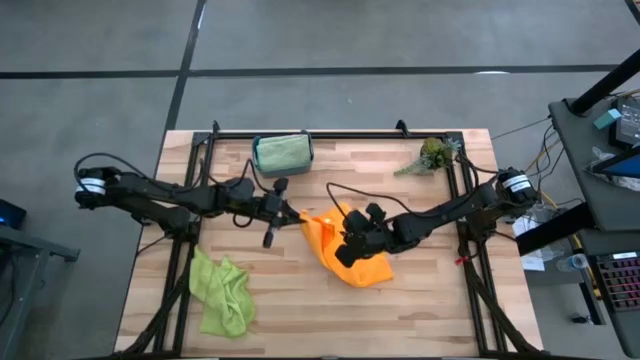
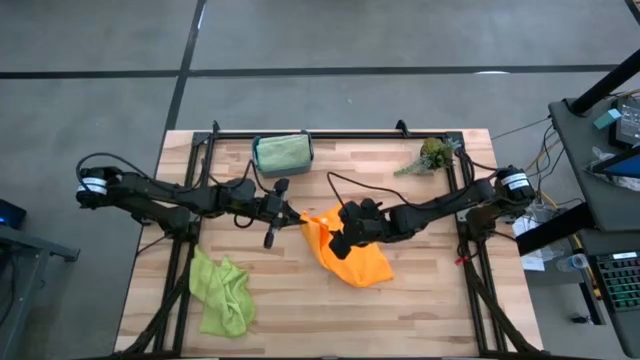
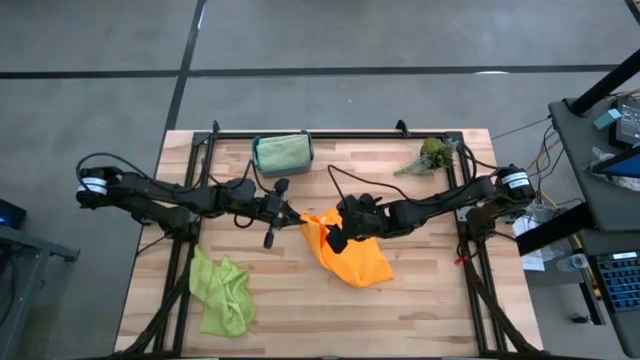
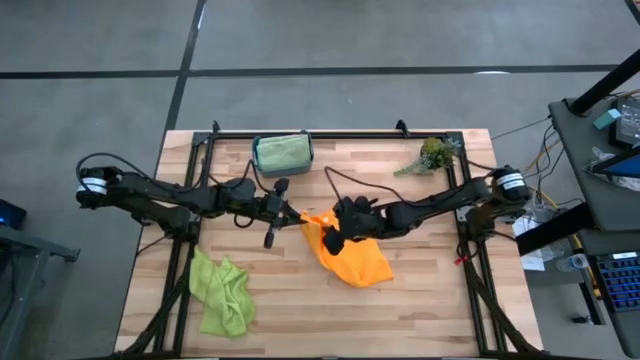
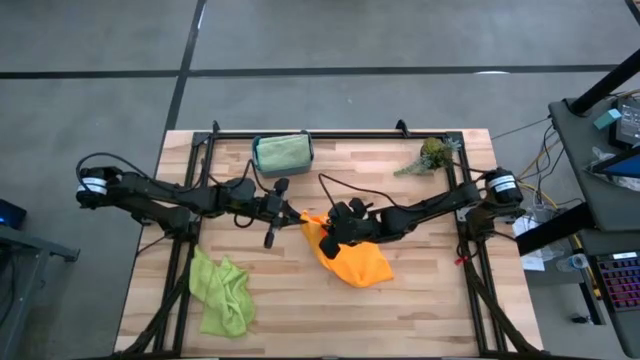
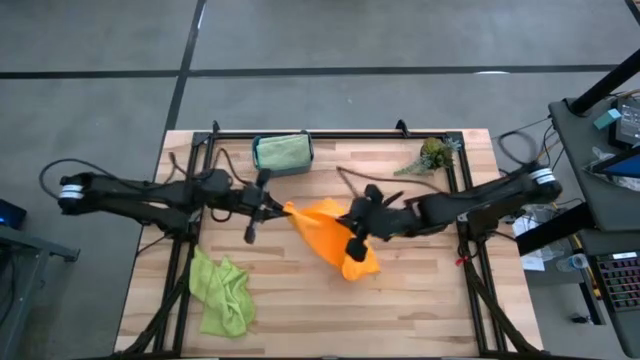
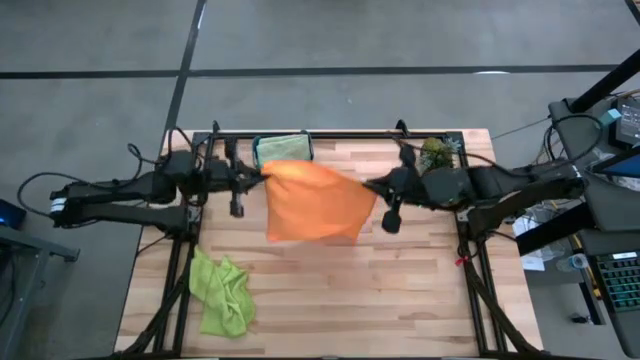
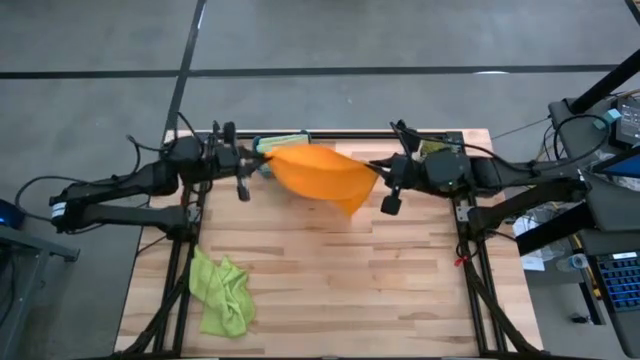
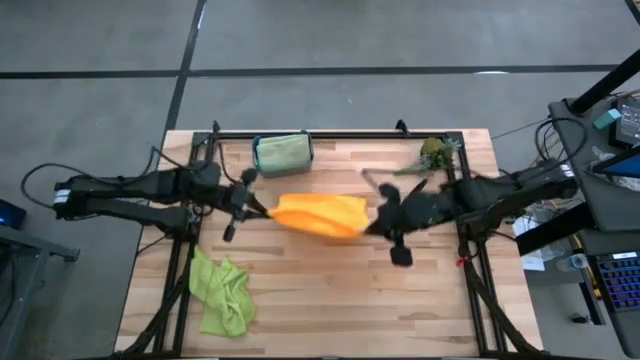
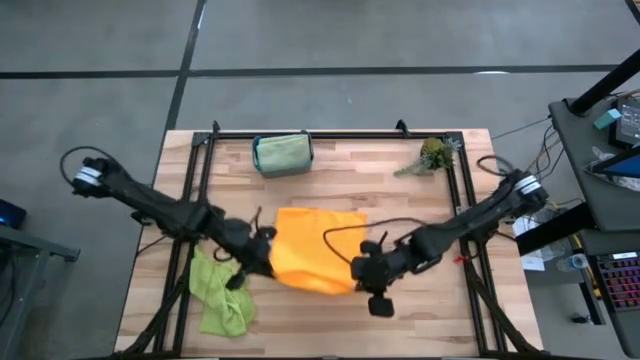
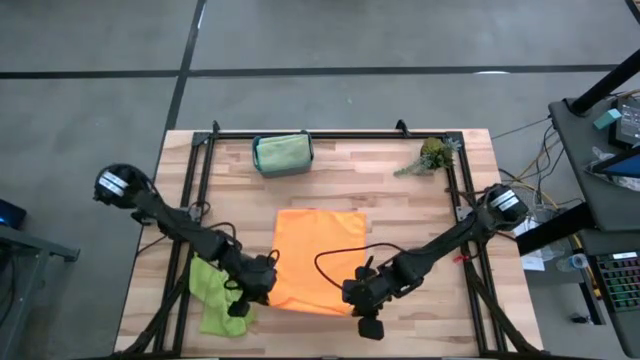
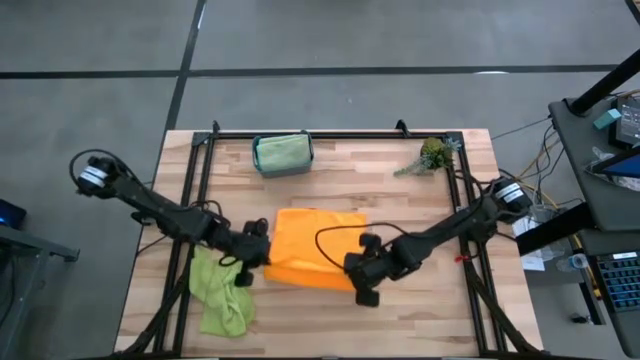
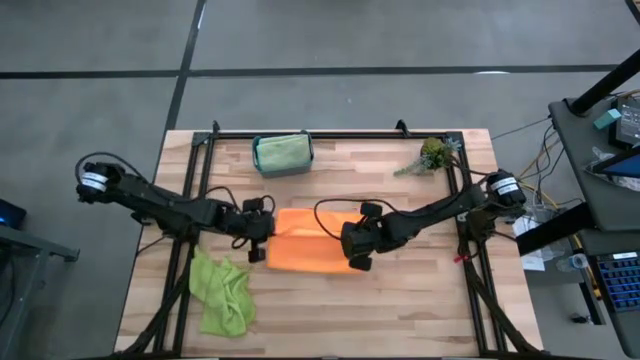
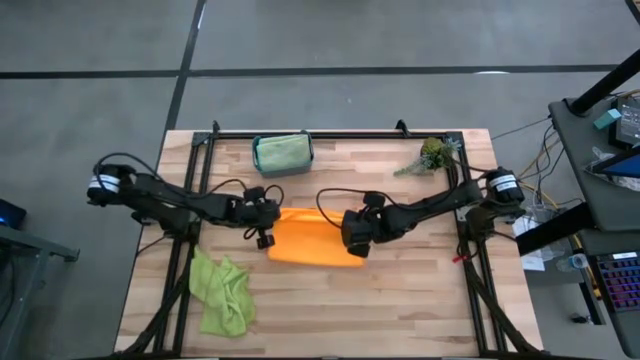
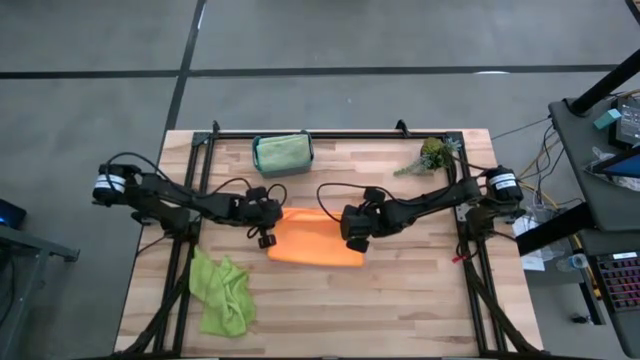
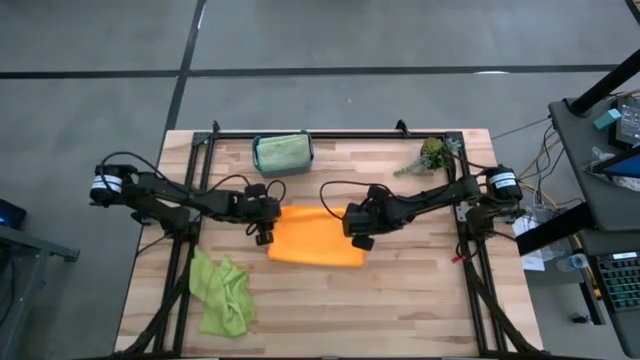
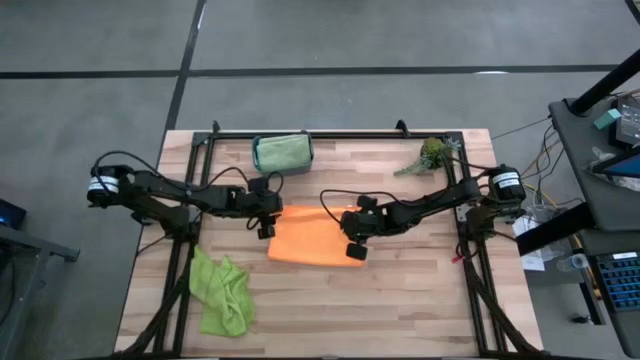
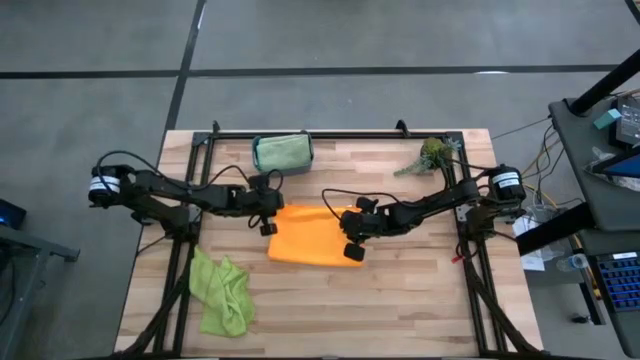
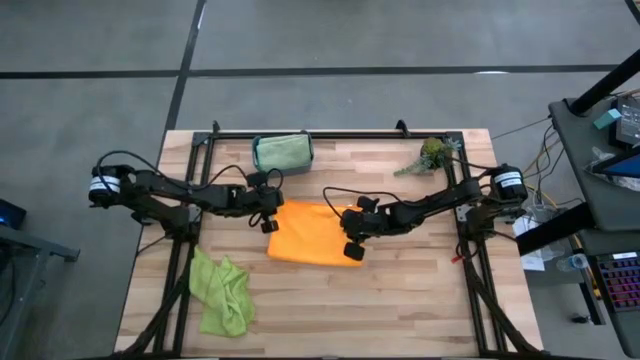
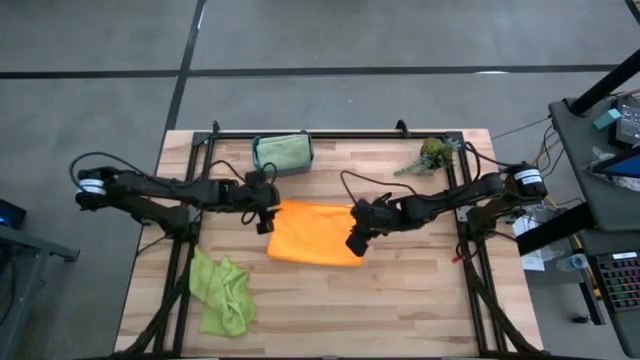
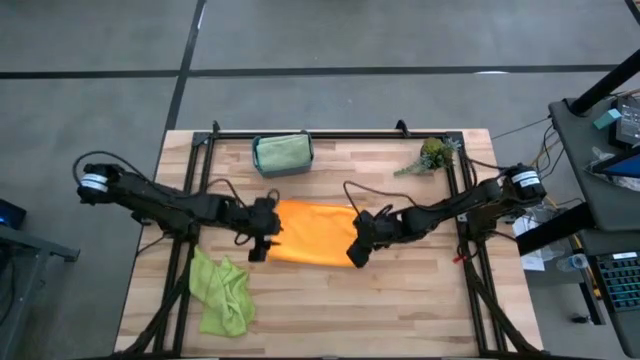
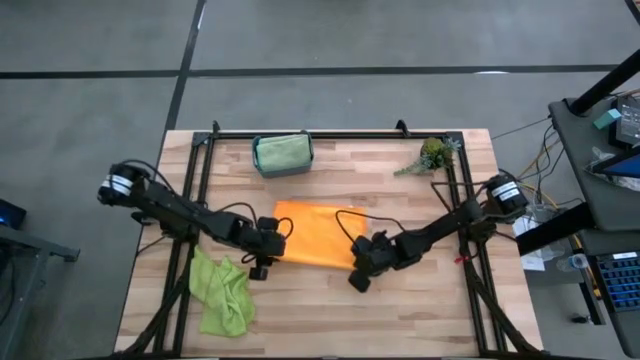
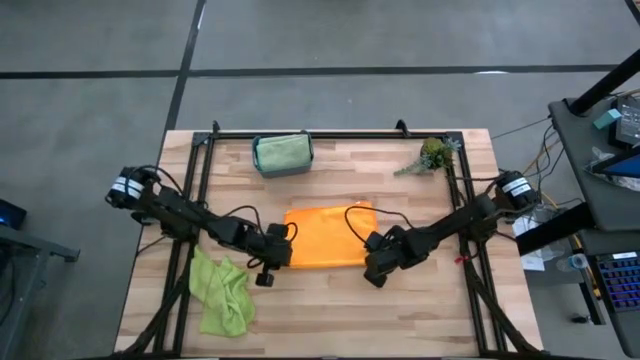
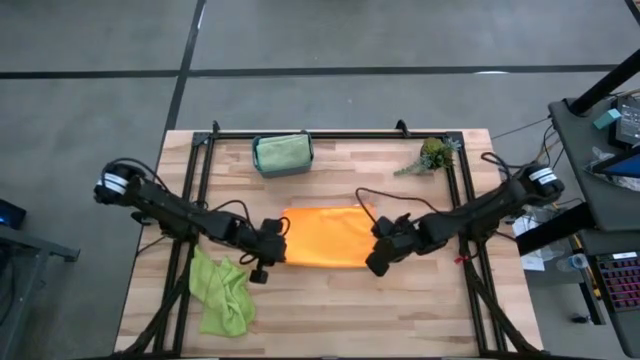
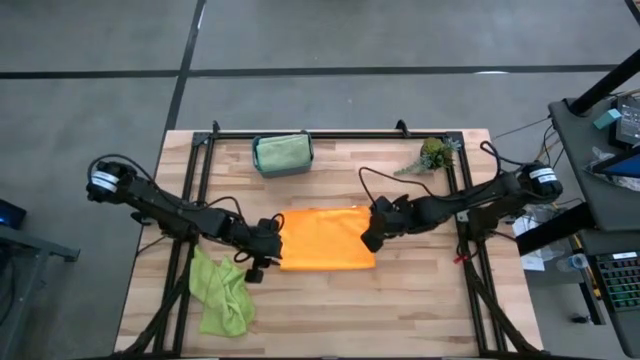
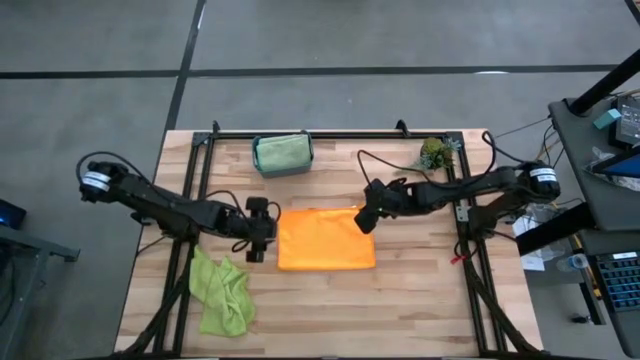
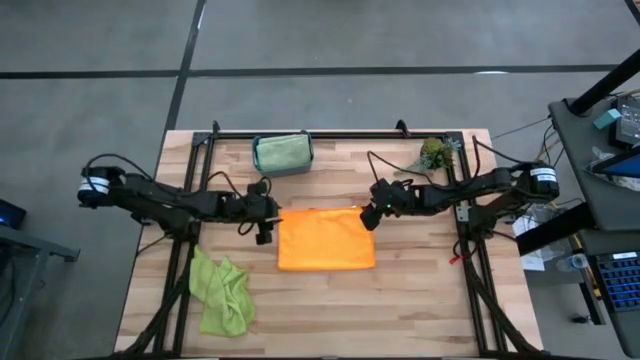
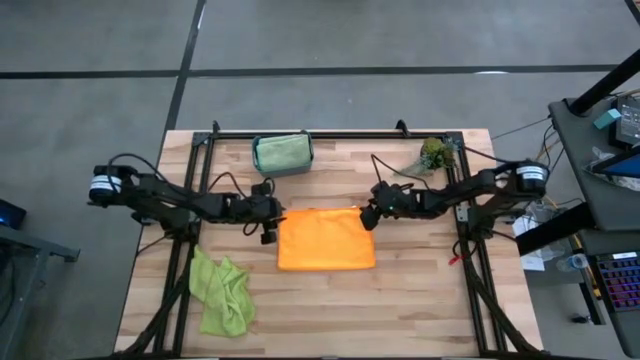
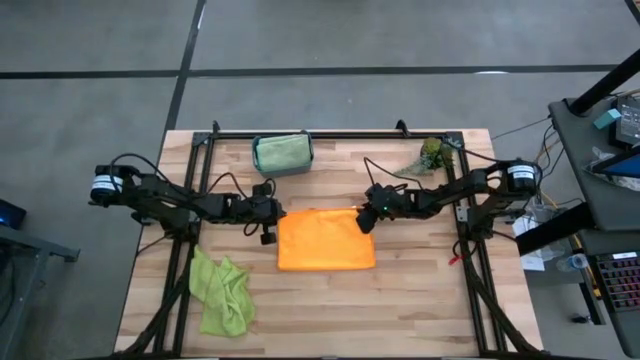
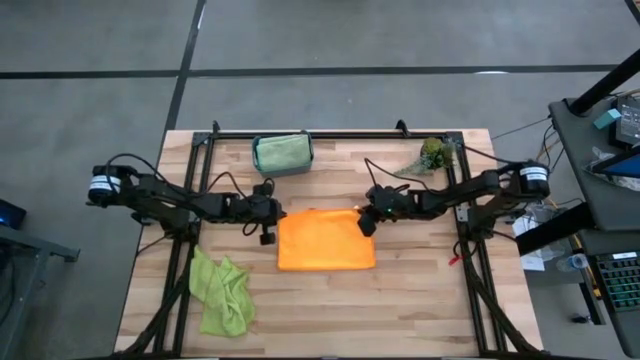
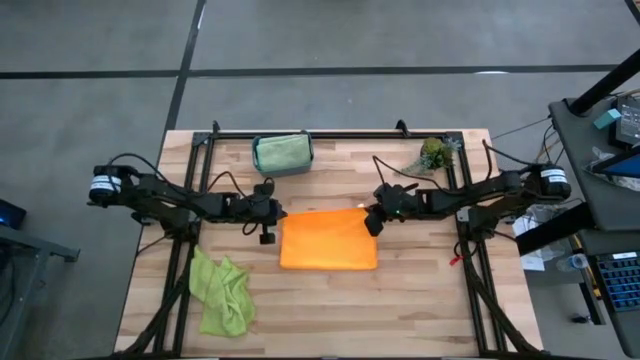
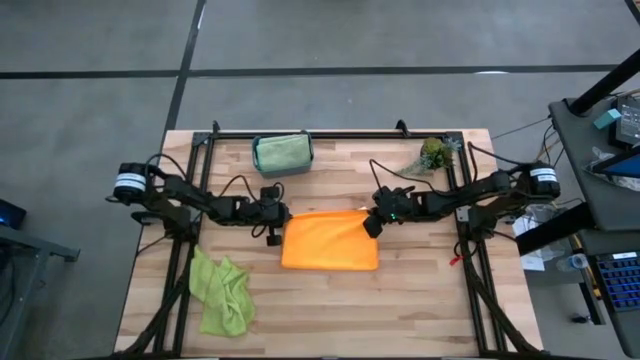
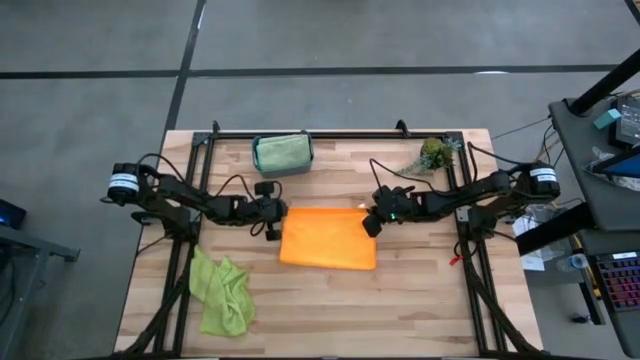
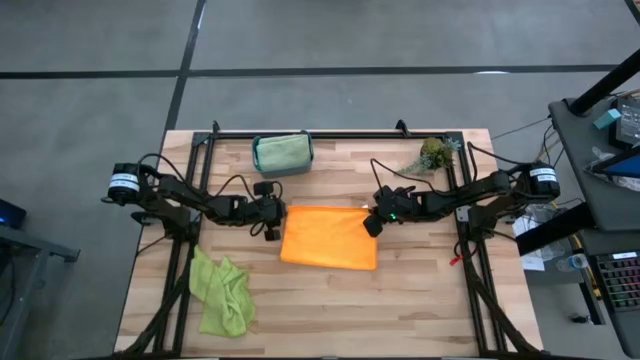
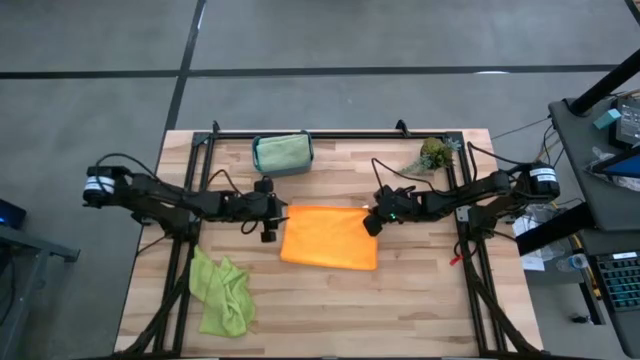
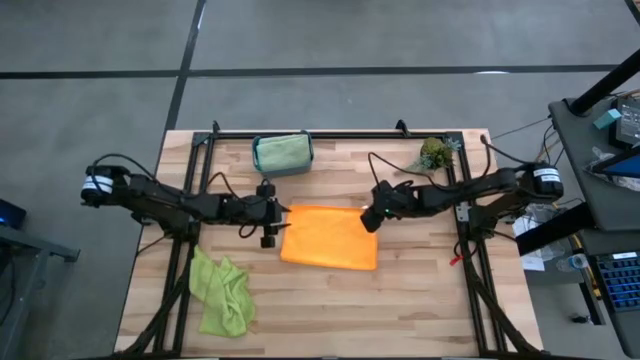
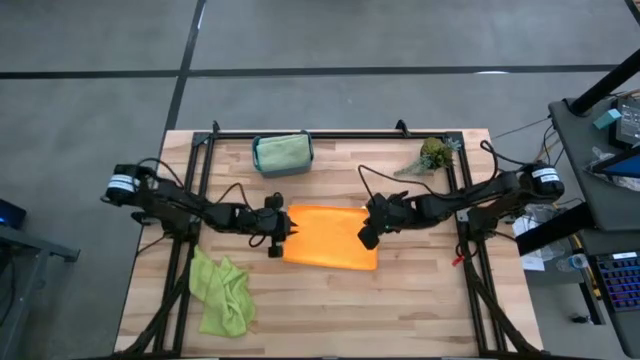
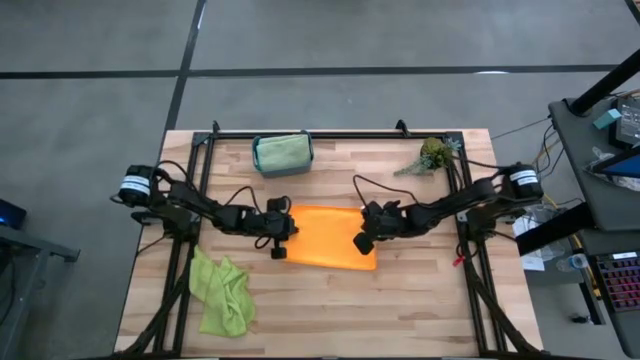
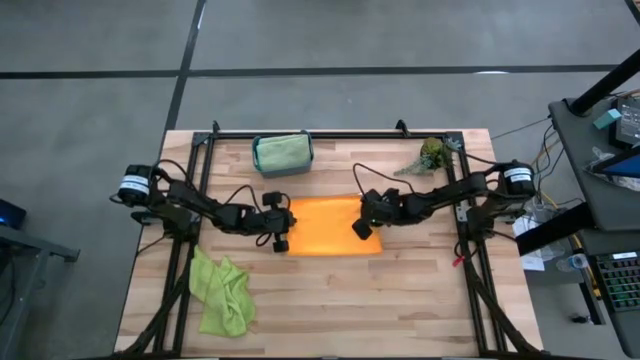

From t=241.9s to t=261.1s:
Task: Fold microfiber towels
Fold the orange microfiber towel

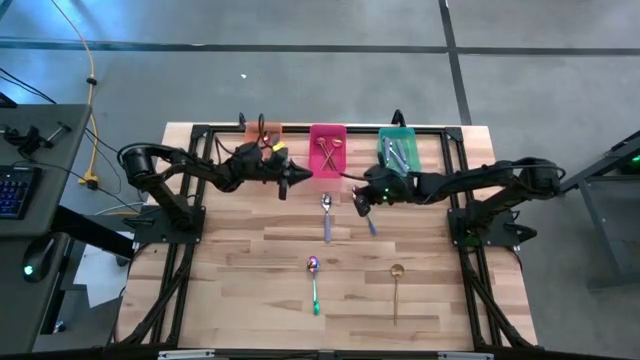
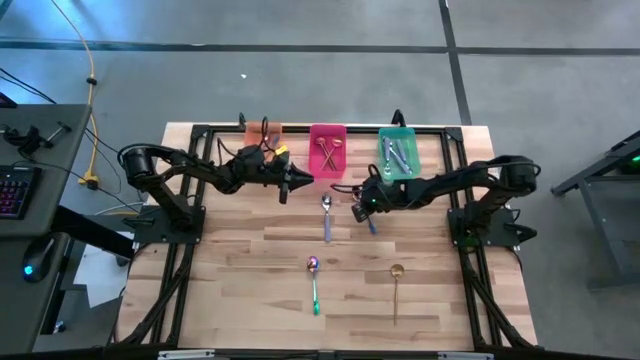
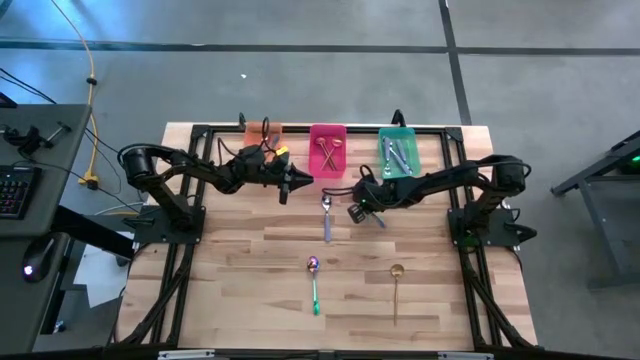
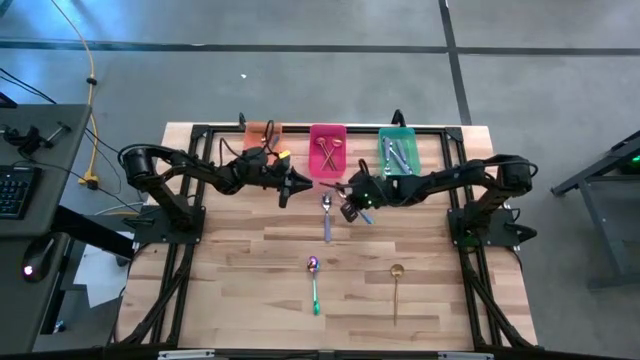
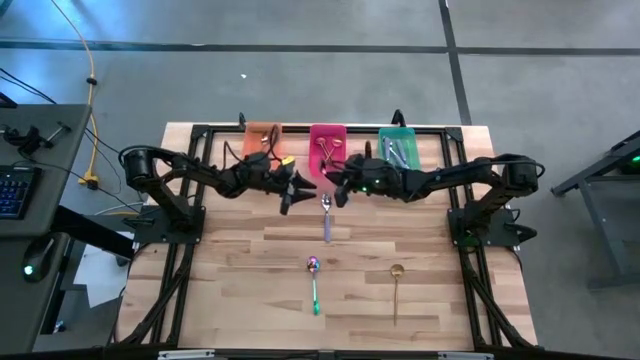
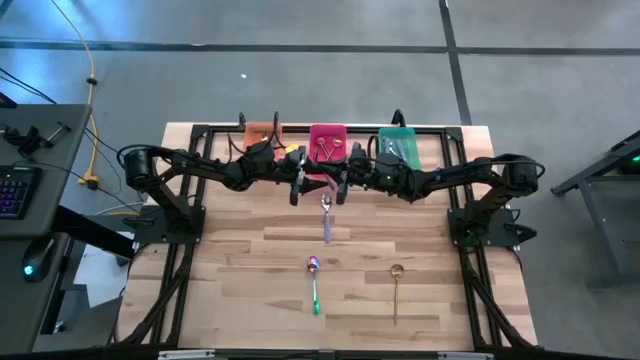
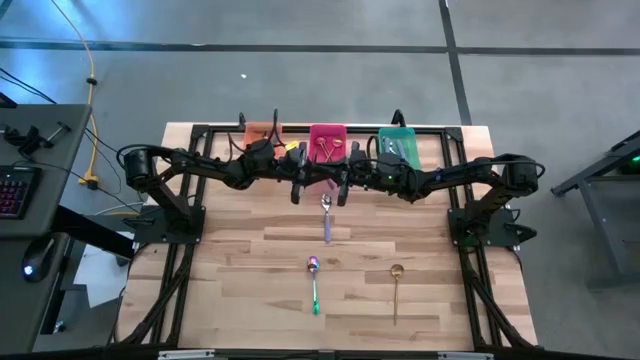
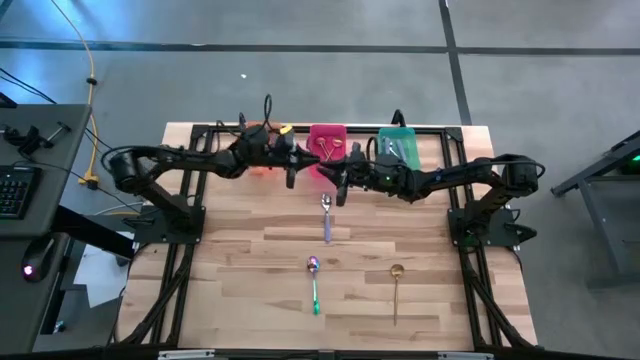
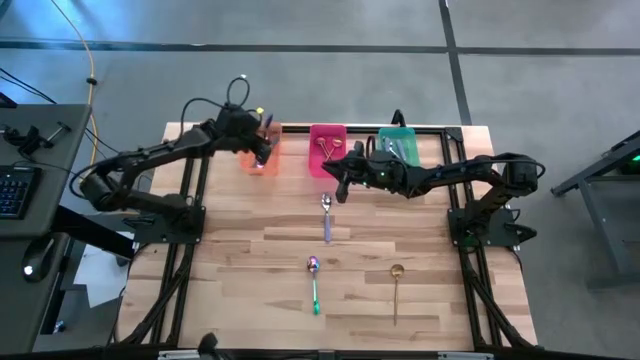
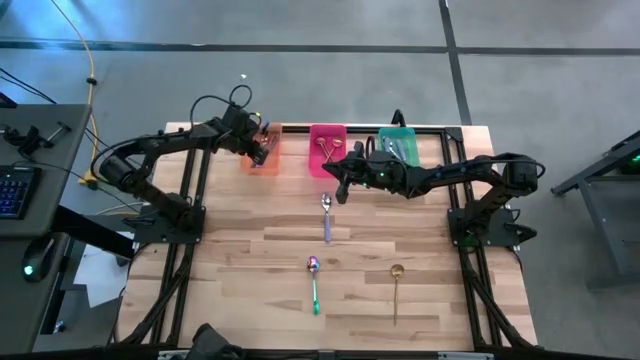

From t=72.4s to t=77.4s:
Task: Sort silverware by color (type)
Put the top iridescent spoon into the orange bin
